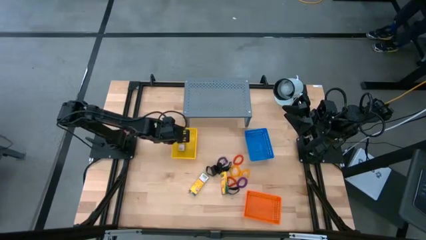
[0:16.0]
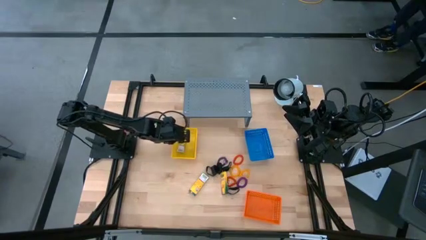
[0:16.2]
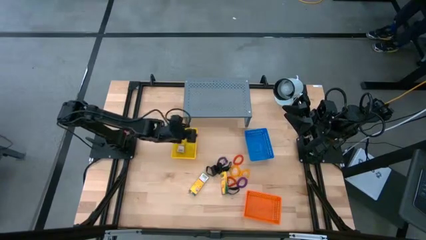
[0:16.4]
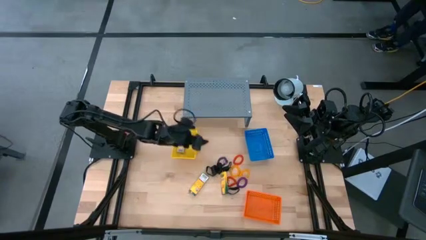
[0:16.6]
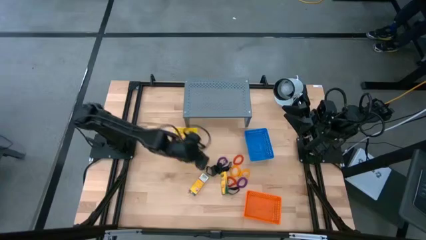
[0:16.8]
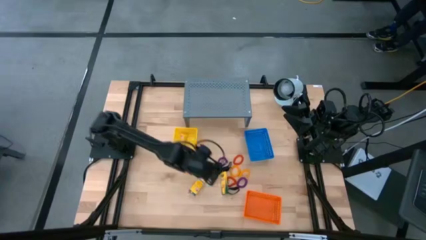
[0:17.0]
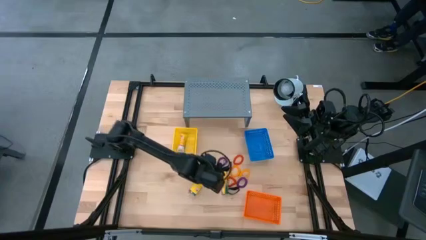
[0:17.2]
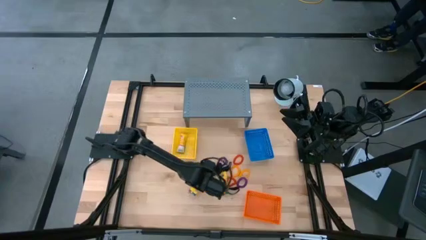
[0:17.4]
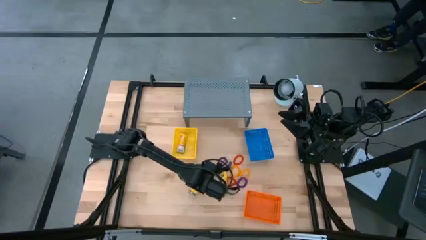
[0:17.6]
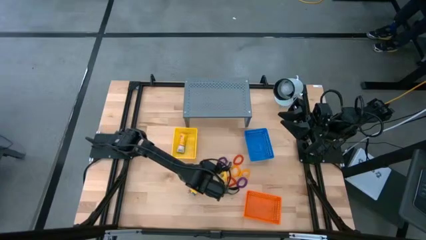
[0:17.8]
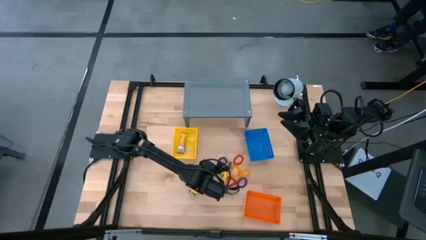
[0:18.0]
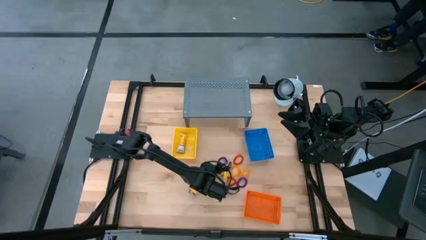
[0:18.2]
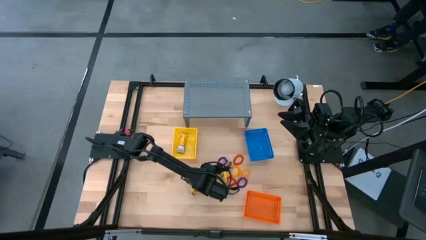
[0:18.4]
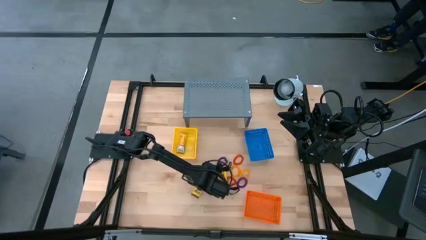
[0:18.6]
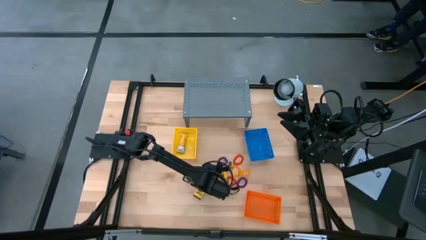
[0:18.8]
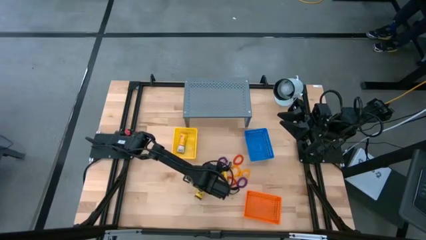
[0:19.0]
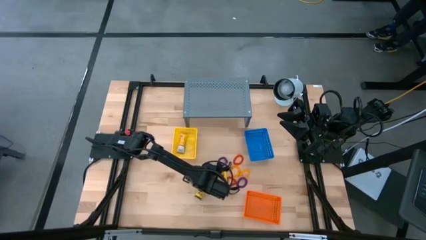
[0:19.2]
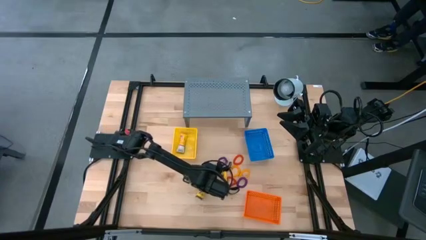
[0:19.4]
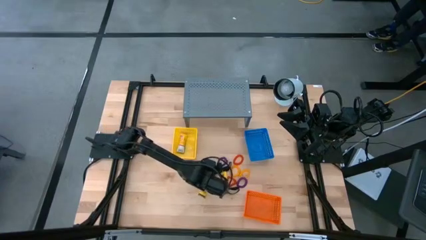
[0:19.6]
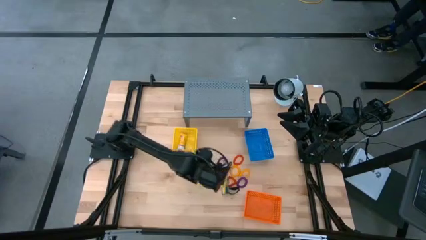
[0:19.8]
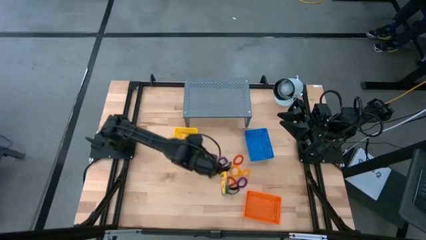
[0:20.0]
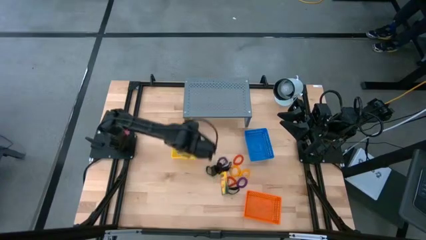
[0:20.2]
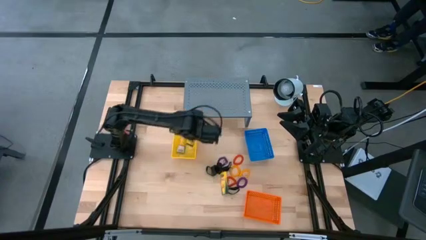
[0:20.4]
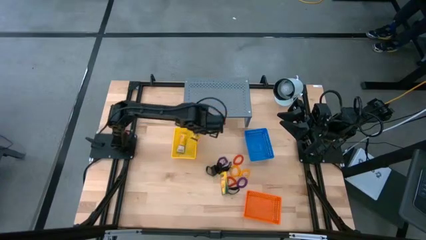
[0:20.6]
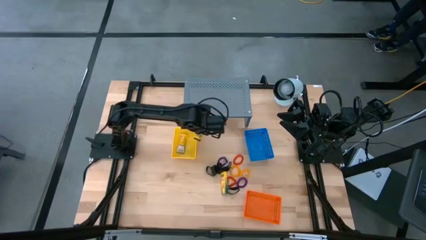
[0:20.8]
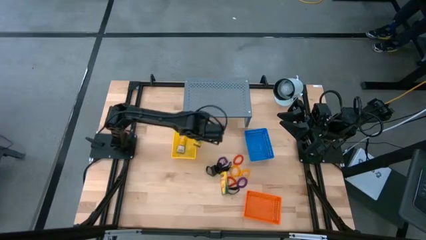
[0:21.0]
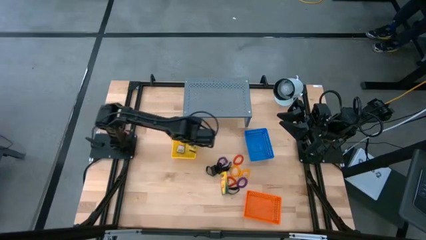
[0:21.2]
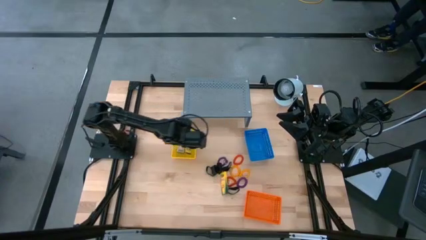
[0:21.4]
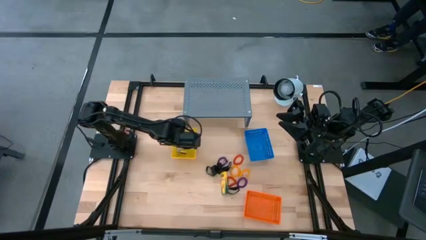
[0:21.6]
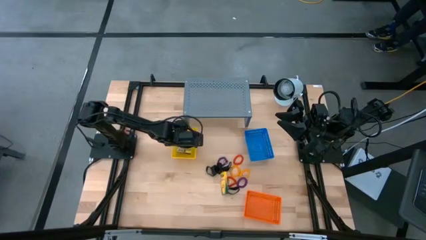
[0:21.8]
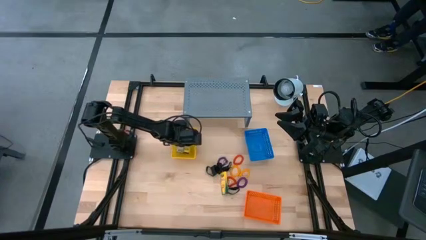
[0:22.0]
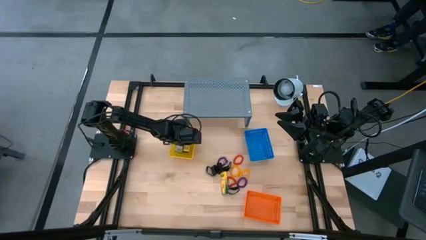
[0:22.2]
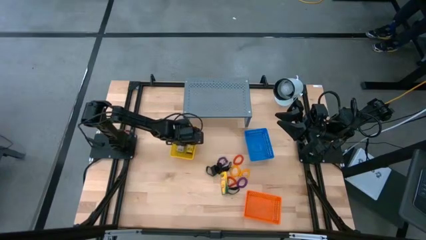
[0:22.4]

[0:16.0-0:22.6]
Task: Pick & Place Office Desk Supplies
Put the yellow box of crayons into the yellow bin

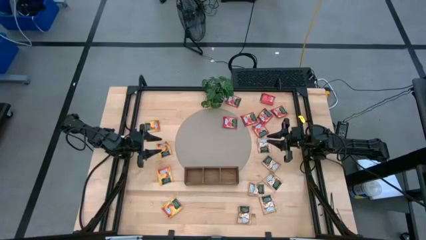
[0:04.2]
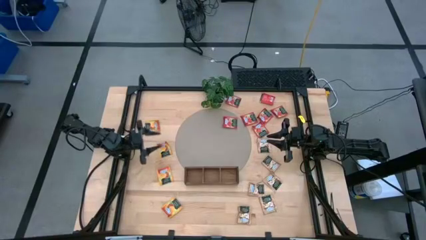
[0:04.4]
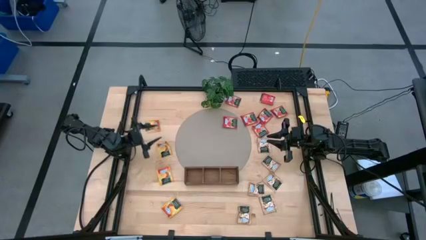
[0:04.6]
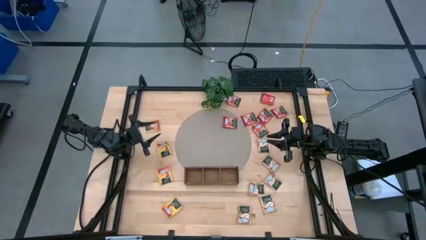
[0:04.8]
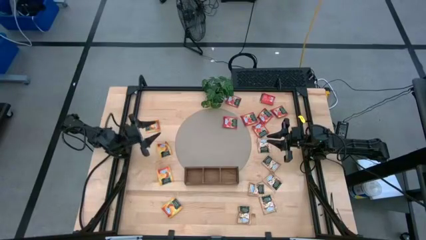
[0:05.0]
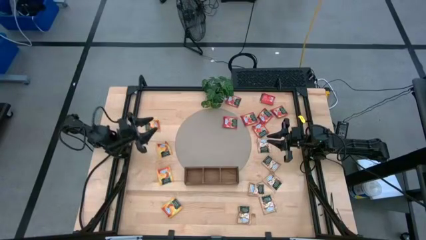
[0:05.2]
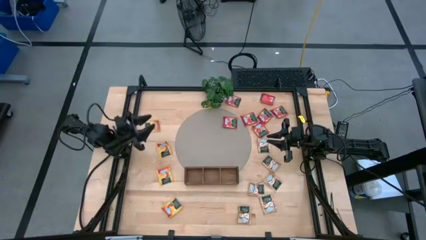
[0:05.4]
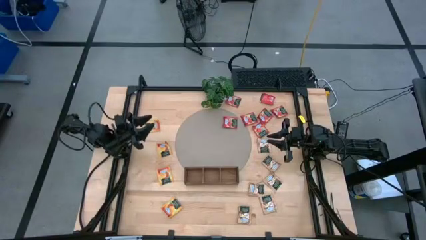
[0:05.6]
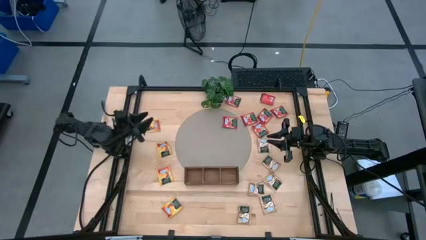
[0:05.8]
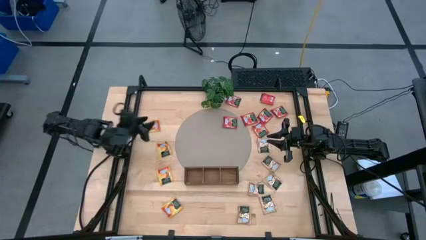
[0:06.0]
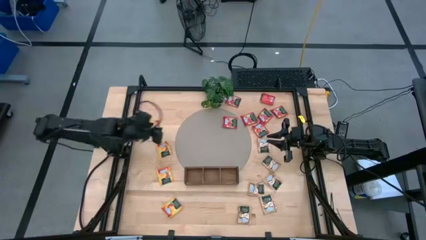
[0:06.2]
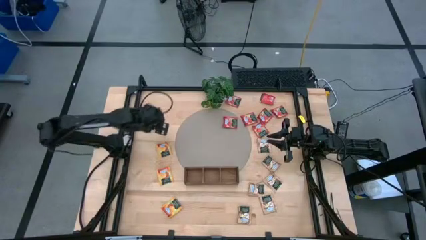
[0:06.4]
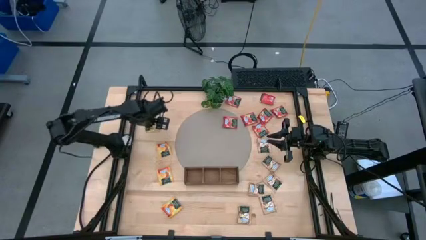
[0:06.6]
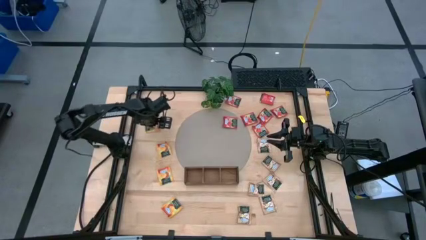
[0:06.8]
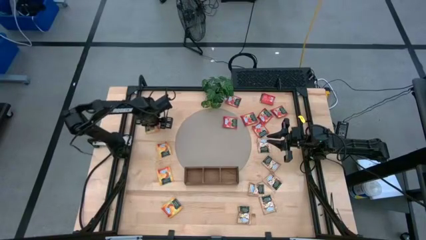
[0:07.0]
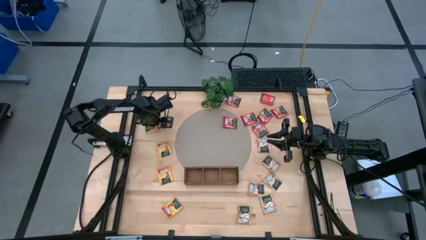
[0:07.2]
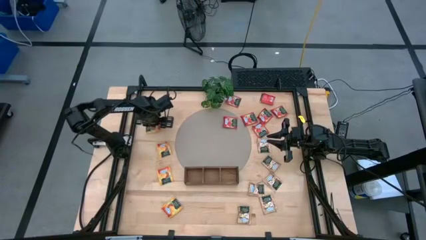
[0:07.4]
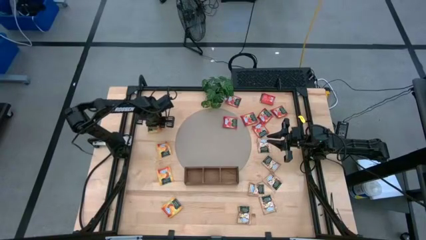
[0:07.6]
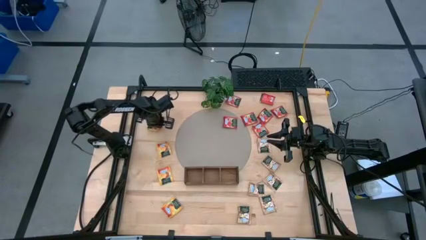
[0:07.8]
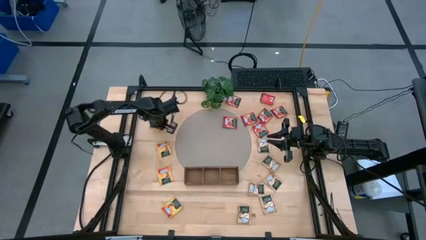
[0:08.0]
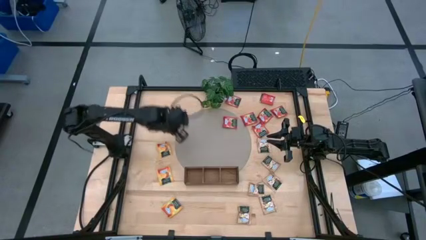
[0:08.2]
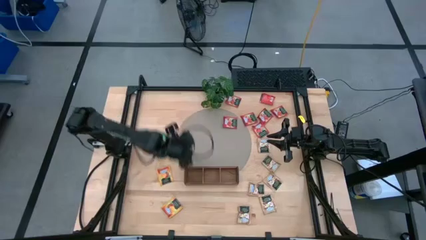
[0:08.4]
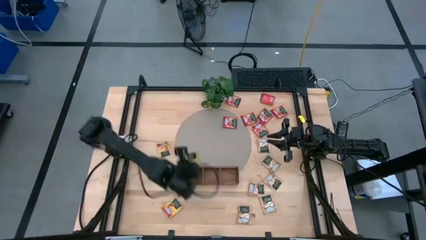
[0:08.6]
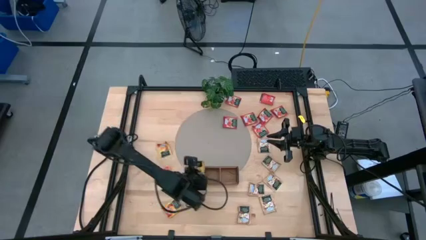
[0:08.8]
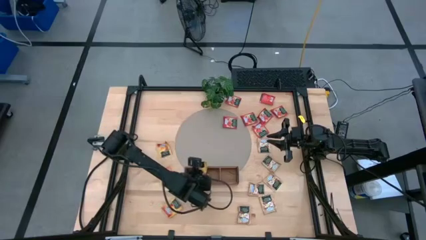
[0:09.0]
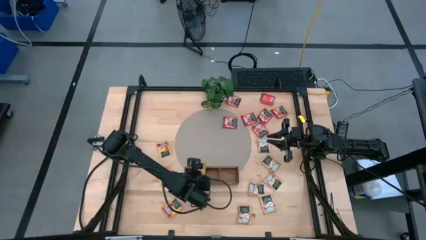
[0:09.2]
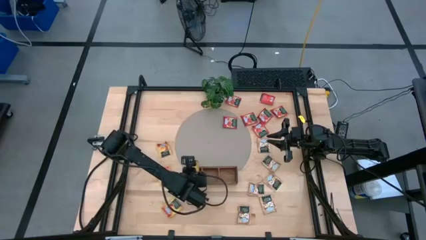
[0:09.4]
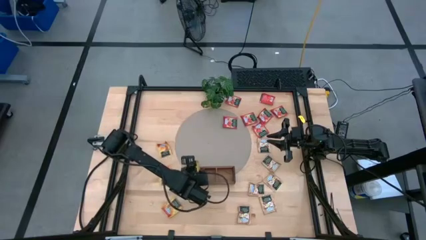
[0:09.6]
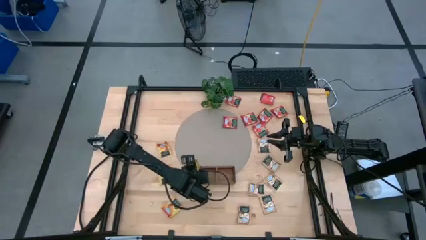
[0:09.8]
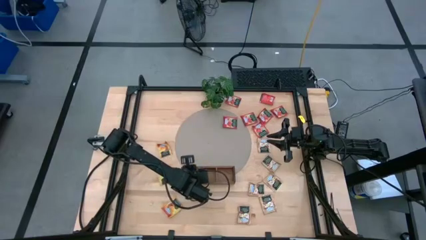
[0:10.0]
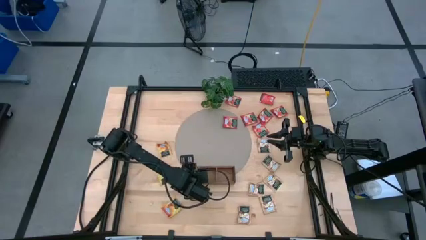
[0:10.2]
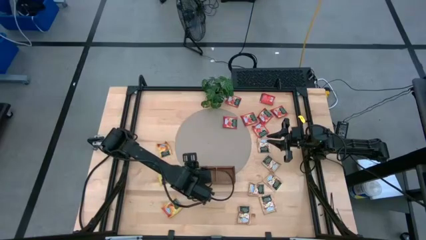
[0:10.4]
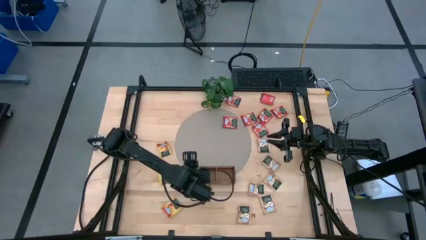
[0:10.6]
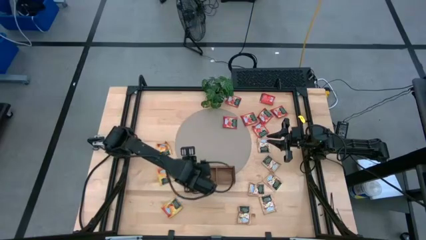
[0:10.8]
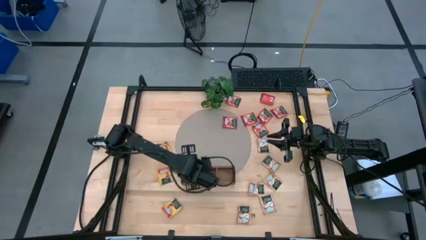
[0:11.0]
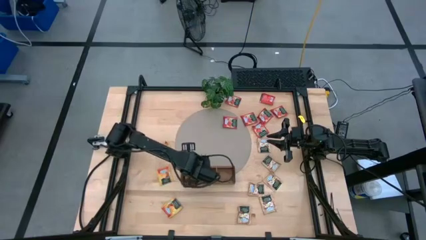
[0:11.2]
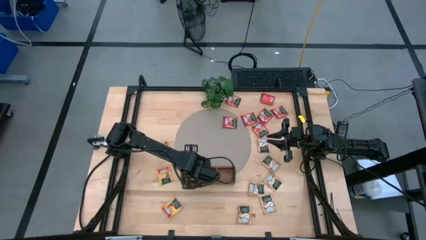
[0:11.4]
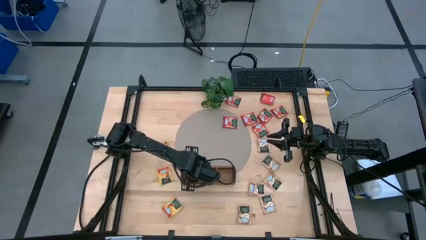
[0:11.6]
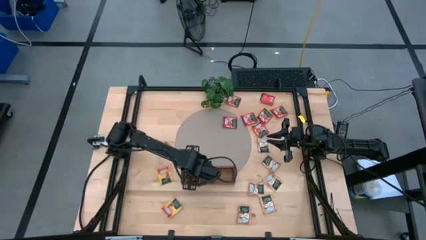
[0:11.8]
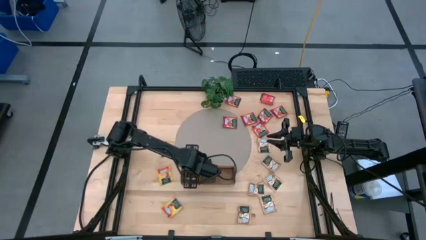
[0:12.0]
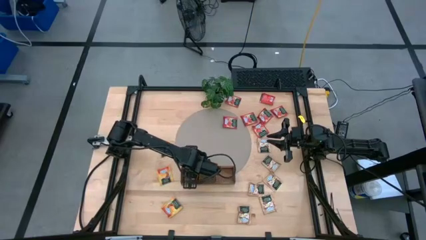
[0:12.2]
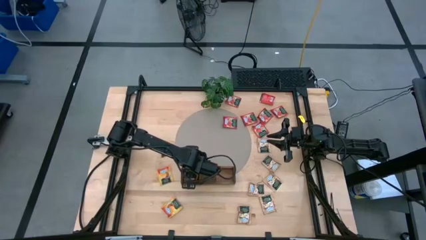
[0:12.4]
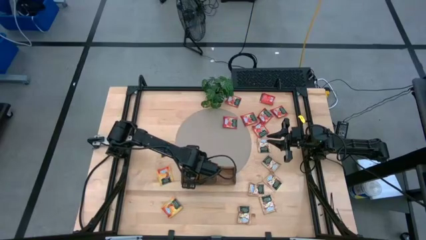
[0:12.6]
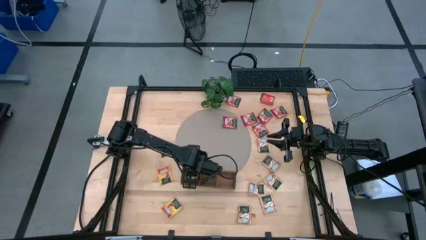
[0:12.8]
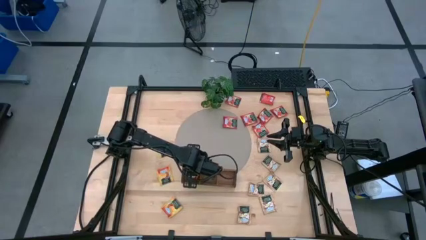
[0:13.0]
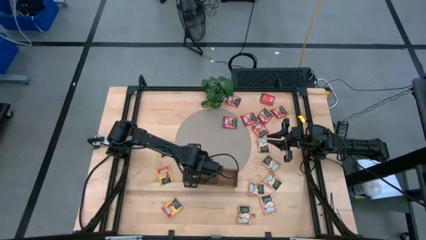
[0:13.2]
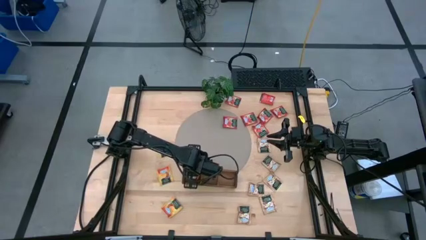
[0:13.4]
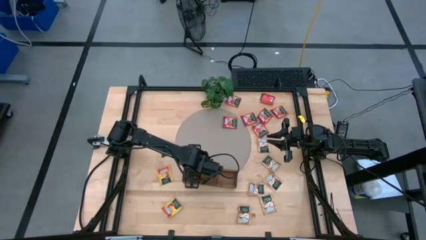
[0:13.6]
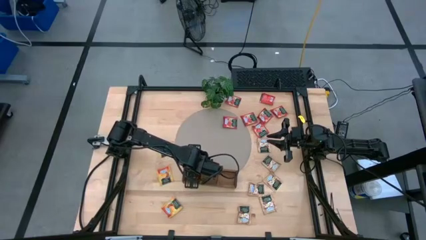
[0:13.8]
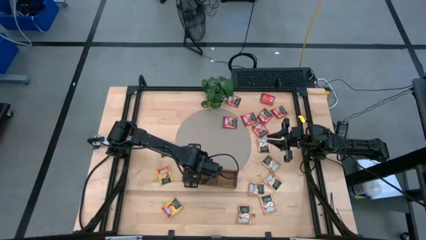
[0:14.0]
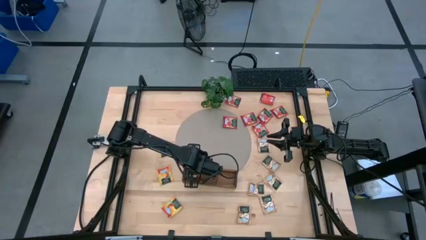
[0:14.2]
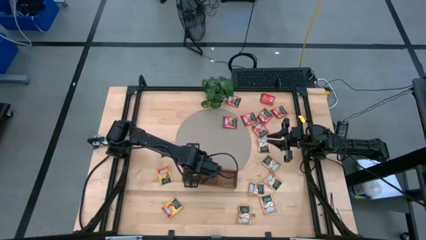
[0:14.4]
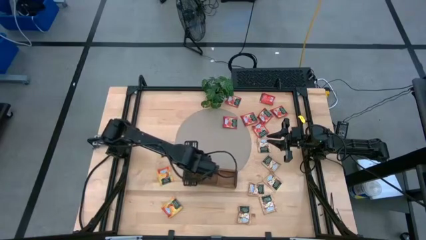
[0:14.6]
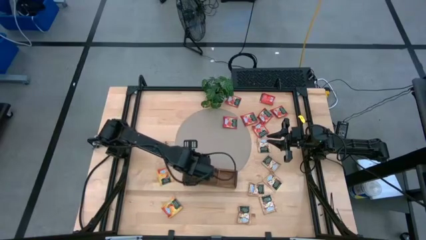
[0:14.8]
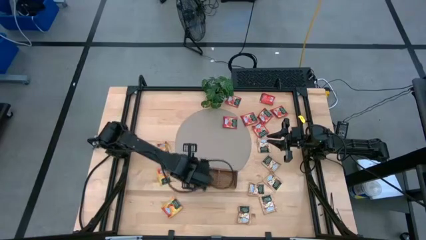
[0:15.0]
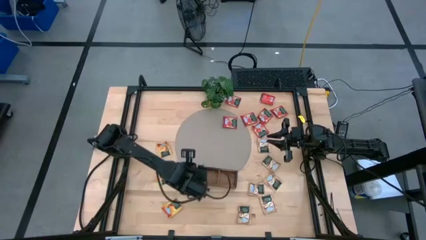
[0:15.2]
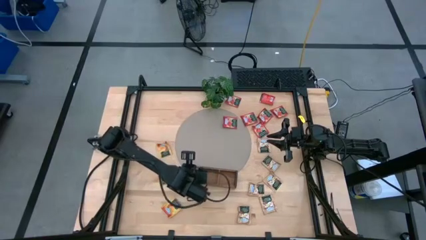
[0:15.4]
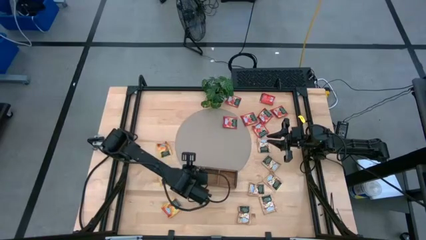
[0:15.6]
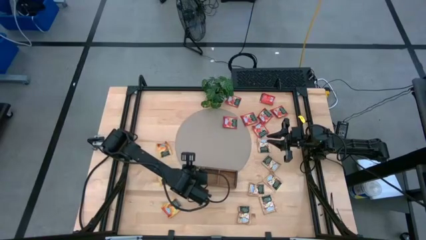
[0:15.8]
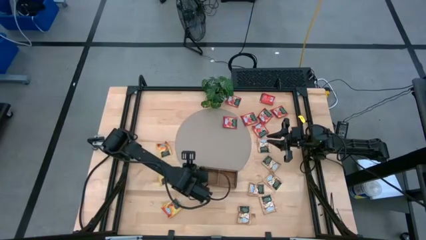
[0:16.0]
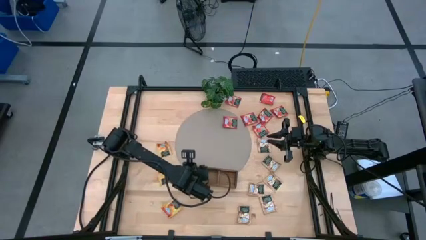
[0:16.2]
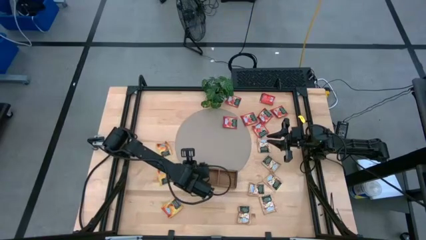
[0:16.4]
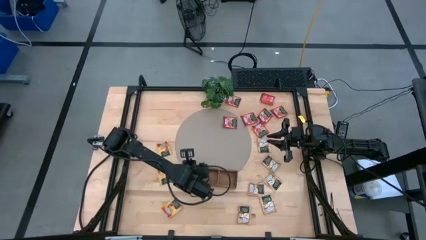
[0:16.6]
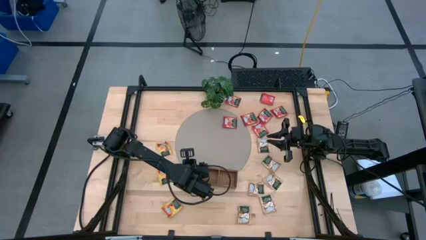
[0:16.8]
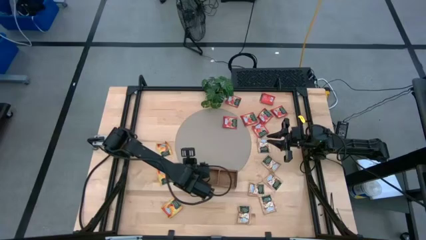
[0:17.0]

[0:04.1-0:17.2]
Task: Pick & Place Tea
Put the orange tea bag into the left slot of the wooden organizer
